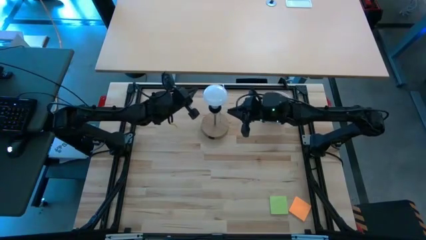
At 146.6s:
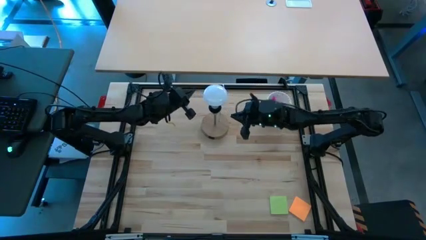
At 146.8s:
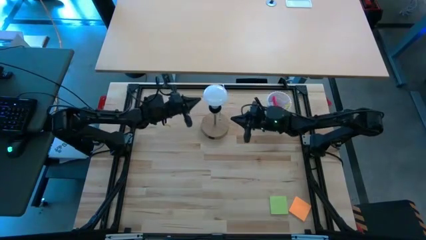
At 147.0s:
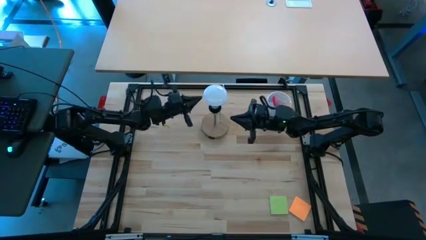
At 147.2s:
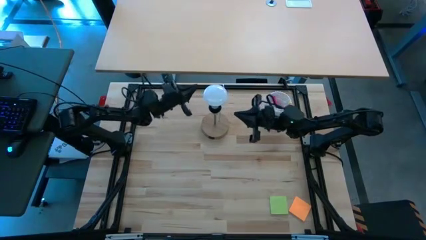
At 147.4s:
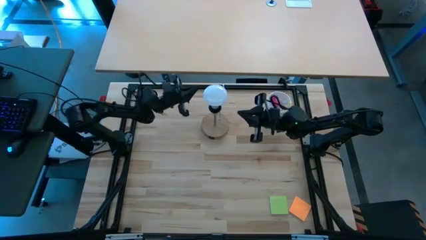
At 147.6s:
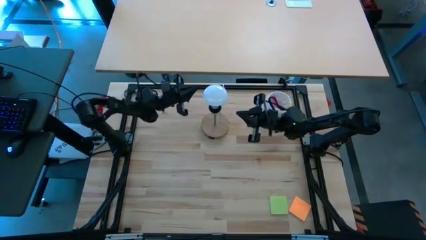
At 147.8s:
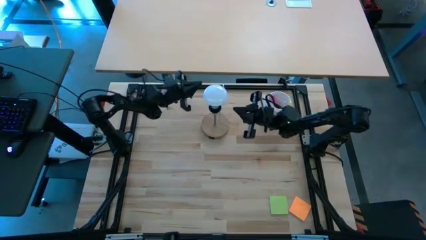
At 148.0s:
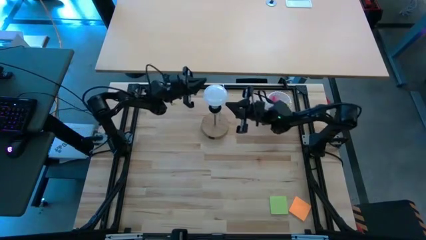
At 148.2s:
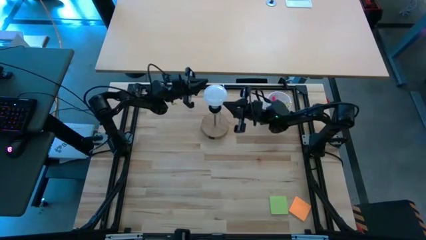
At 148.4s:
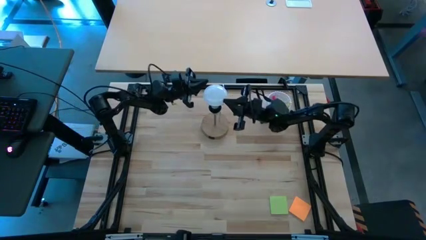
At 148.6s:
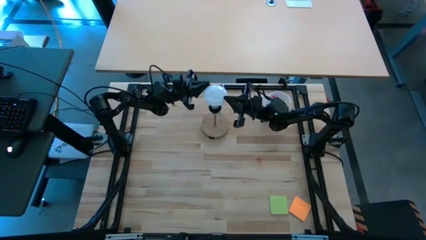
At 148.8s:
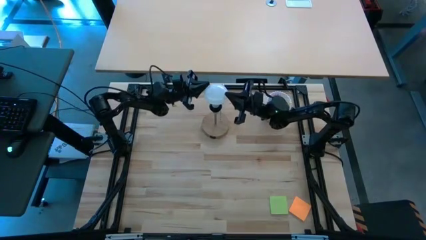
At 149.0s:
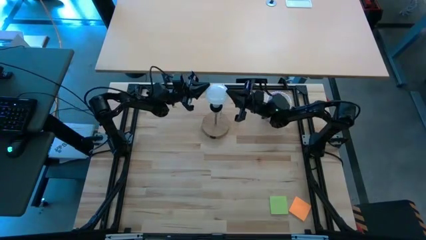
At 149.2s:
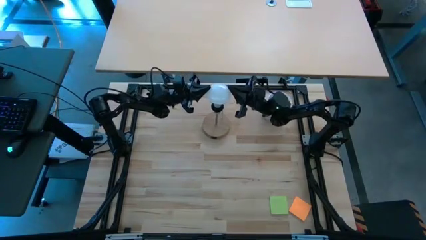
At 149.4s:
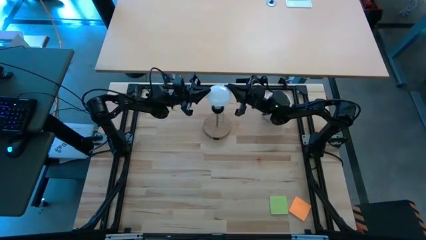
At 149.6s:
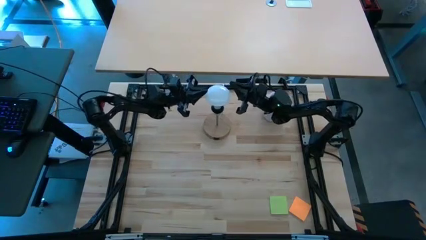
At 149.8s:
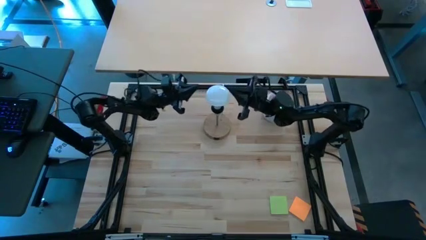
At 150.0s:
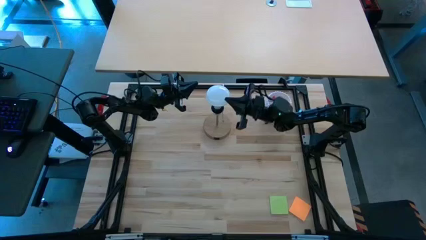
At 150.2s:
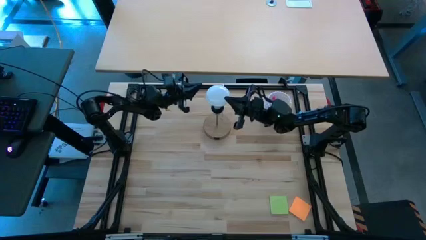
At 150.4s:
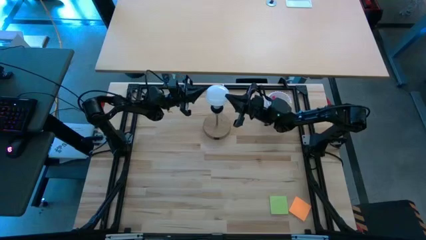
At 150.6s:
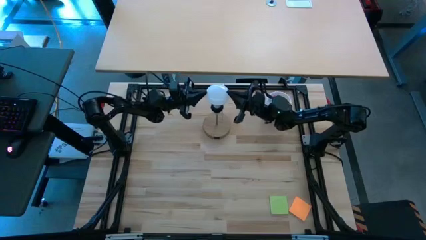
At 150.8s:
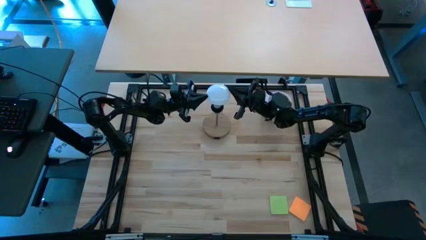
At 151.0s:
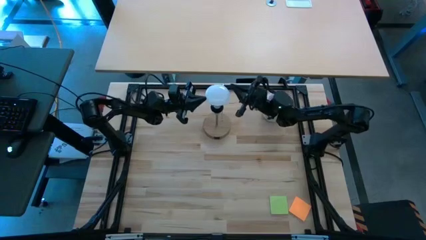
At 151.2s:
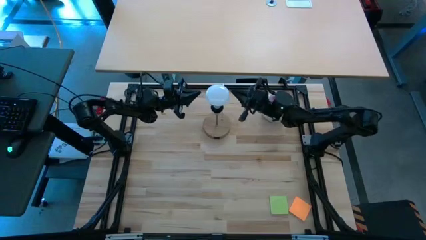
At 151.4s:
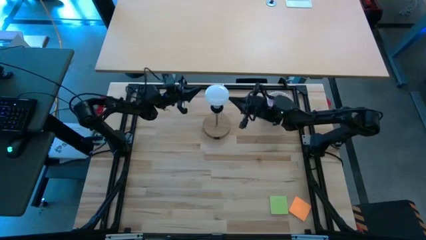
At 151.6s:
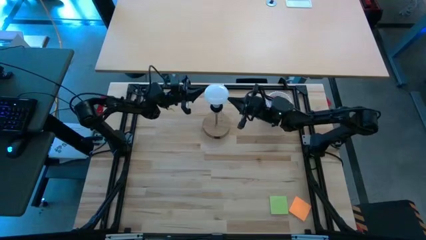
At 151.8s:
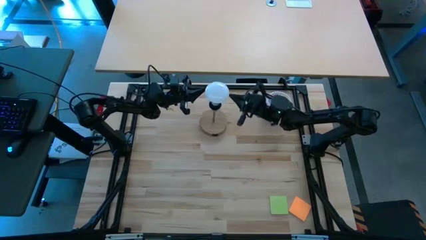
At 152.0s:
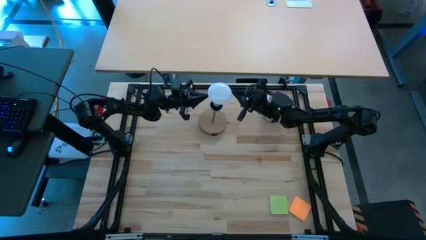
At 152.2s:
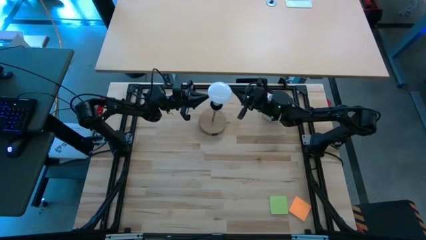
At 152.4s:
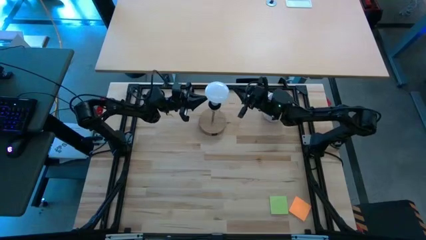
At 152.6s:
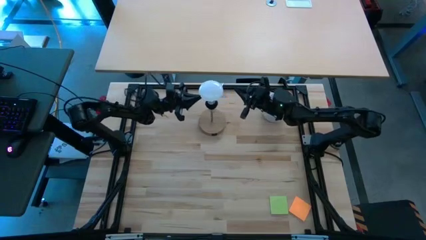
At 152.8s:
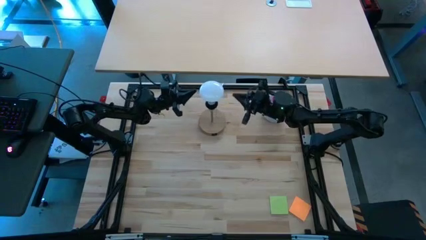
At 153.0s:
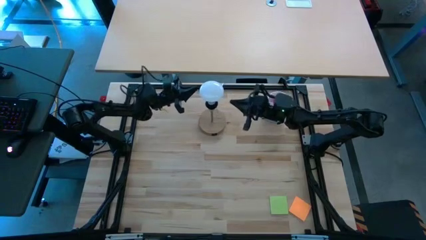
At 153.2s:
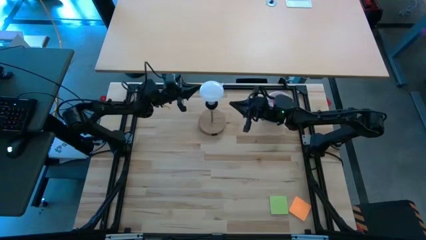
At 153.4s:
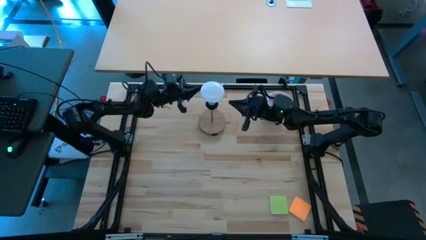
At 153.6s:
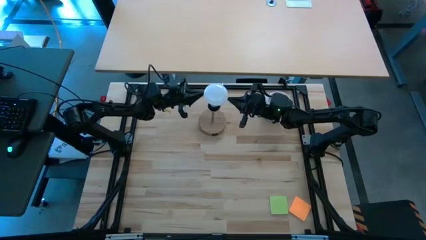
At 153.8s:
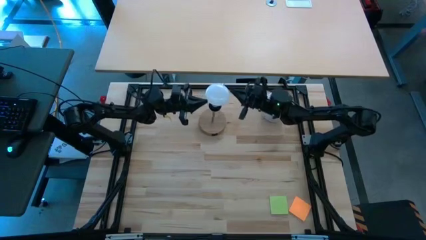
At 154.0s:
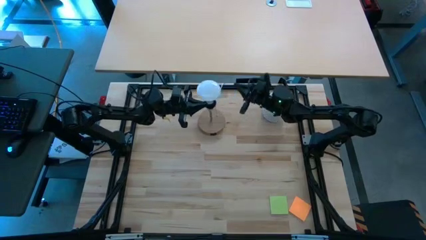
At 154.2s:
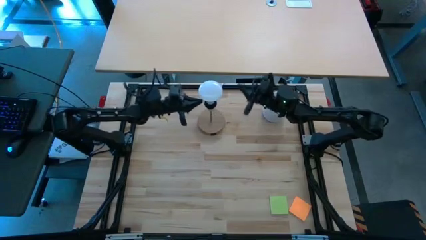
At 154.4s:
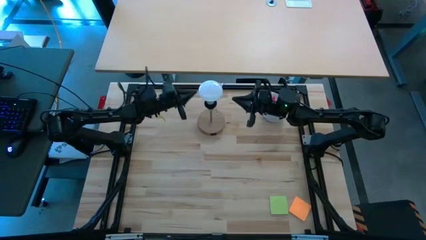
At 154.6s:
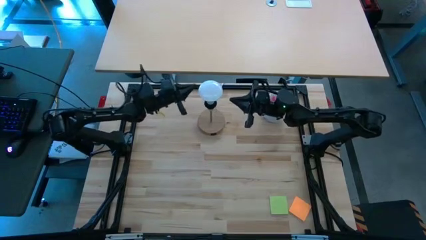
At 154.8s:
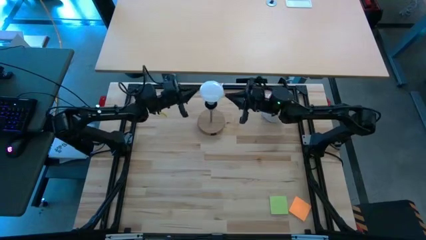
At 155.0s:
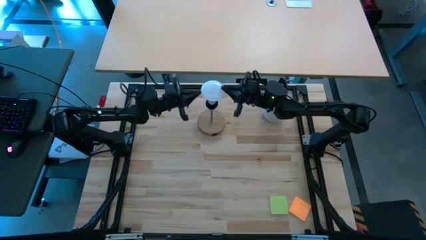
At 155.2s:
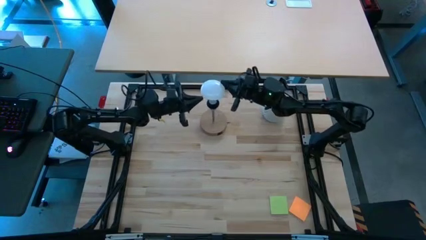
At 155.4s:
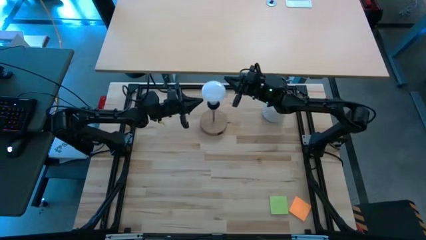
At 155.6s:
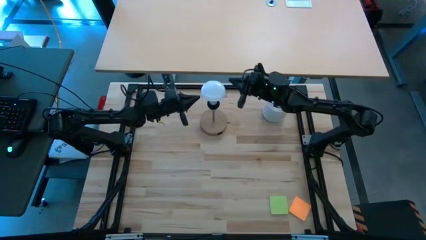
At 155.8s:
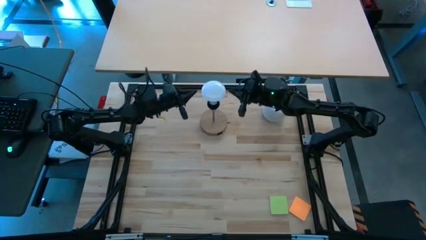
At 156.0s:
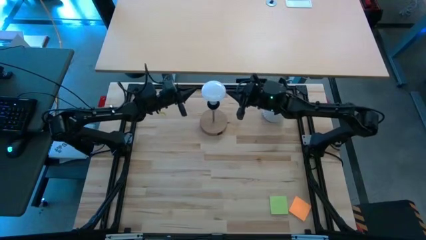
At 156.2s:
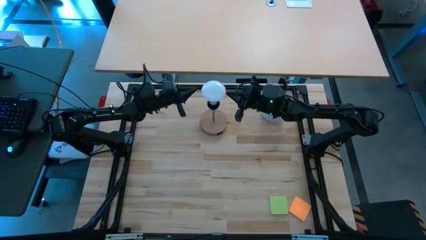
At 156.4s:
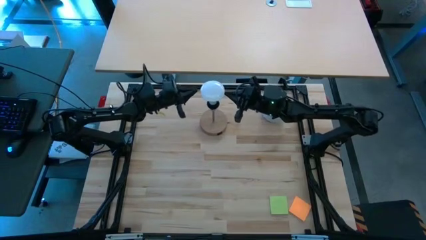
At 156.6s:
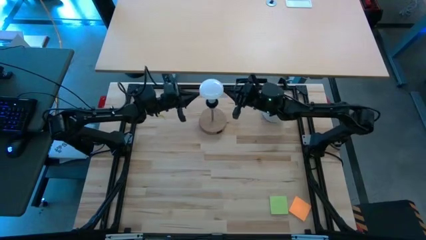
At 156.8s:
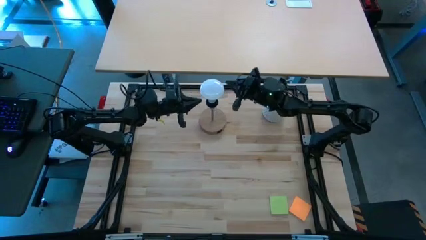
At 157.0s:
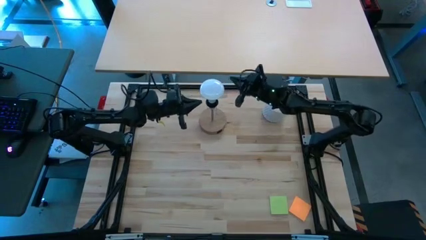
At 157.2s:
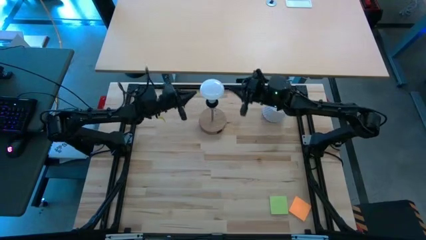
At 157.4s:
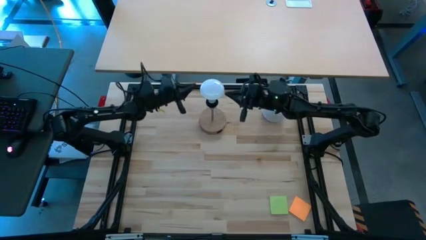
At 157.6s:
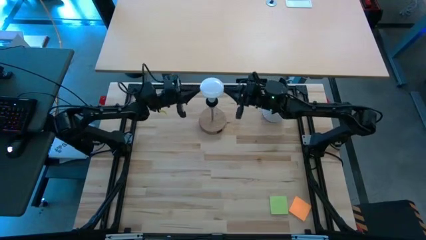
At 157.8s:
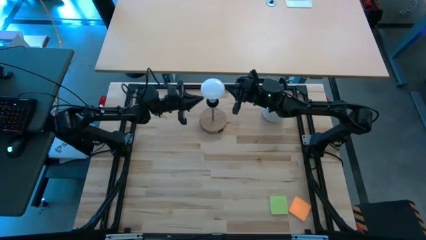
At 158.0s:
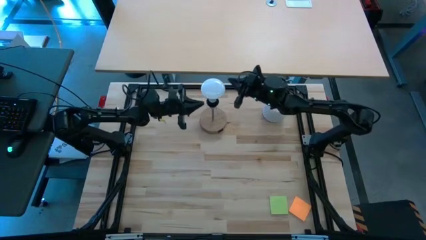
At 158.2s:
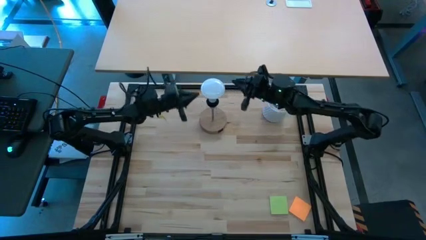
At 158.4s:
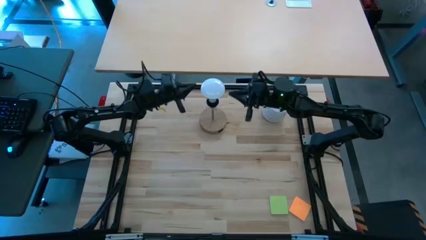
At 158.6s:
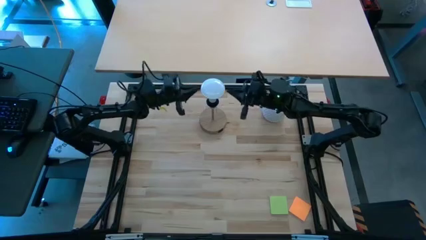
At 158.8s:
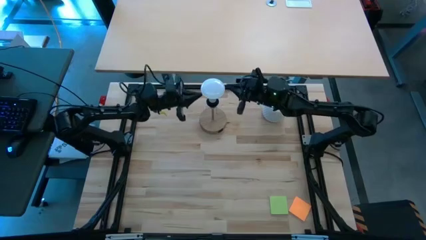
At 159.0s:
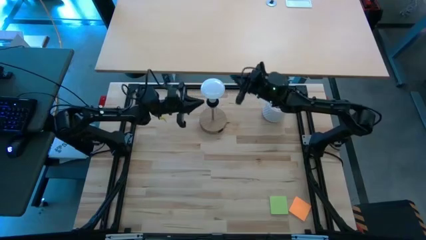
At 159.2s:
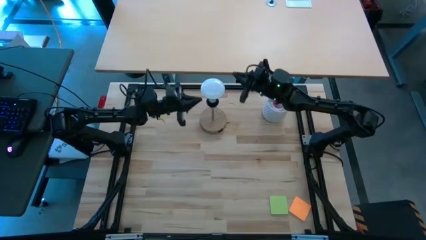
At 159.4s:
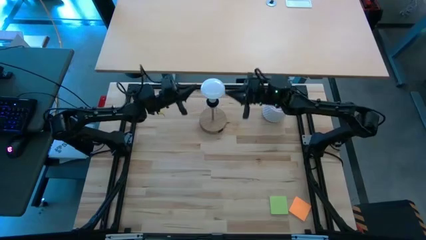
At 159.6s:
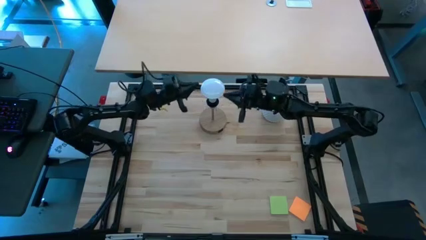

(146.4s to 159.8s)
Task: Screw lightbulb
Remove the white lightbulb from the desk lamp

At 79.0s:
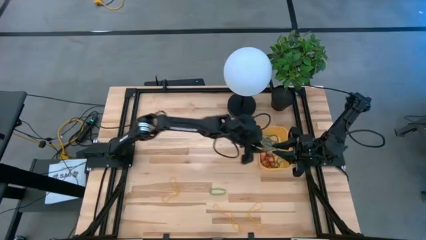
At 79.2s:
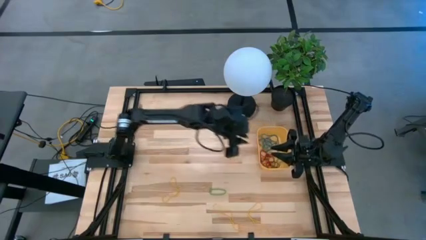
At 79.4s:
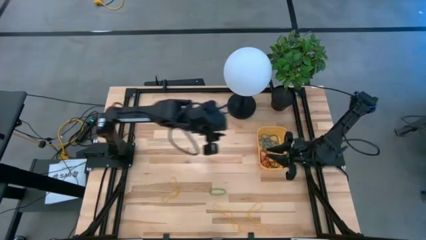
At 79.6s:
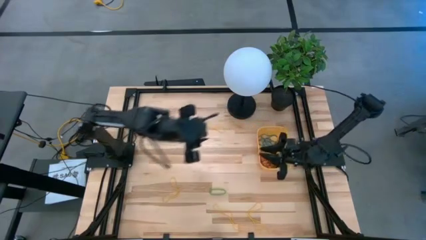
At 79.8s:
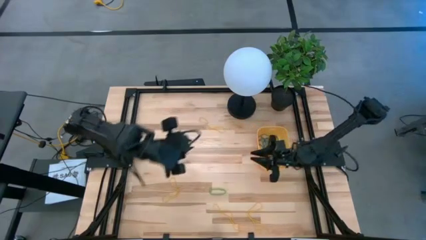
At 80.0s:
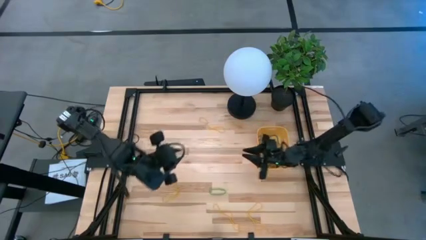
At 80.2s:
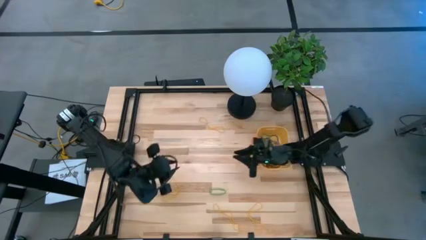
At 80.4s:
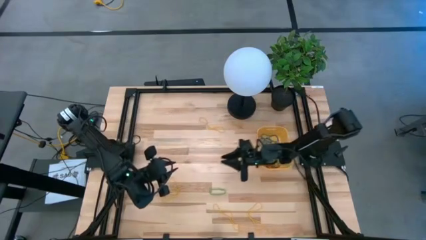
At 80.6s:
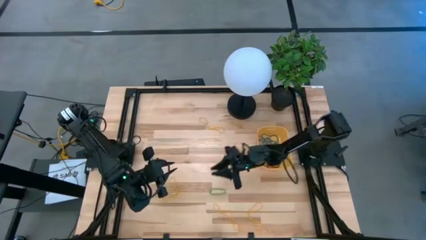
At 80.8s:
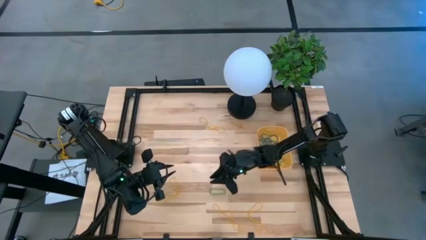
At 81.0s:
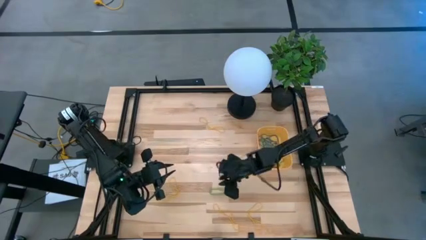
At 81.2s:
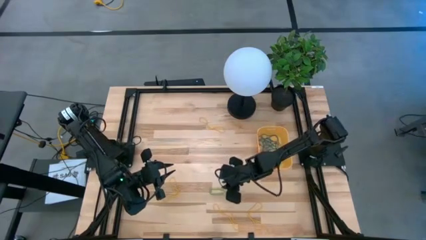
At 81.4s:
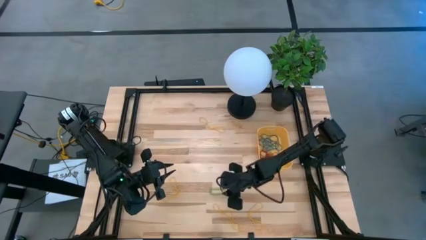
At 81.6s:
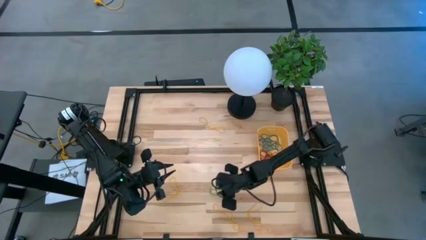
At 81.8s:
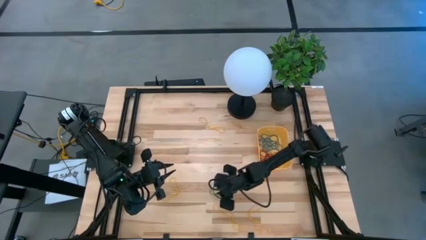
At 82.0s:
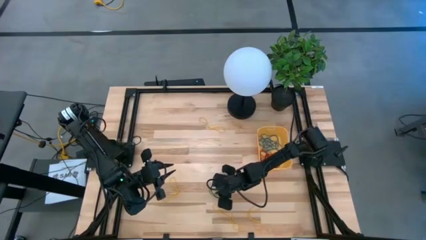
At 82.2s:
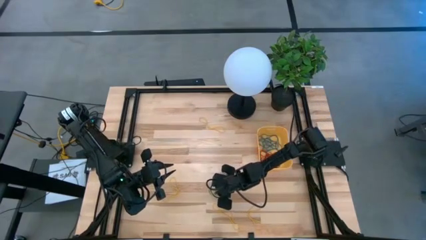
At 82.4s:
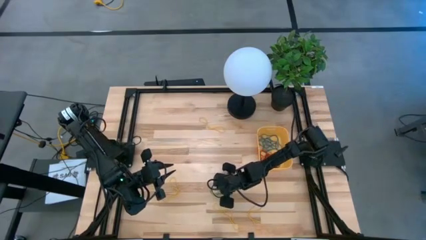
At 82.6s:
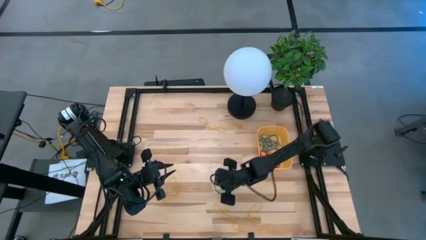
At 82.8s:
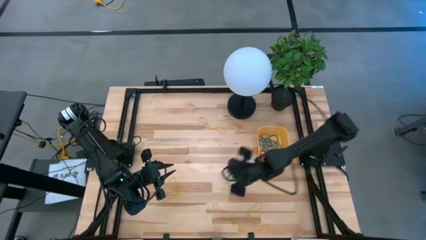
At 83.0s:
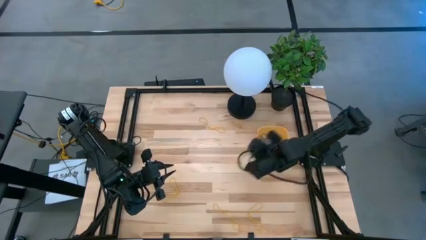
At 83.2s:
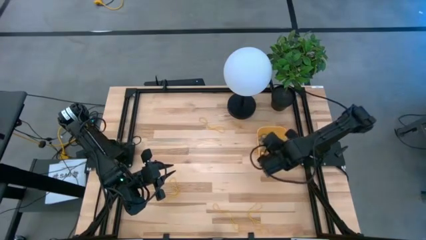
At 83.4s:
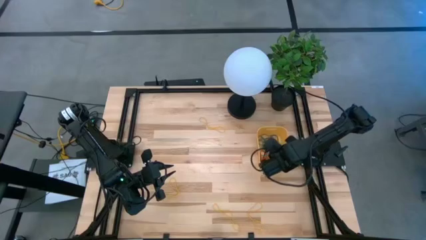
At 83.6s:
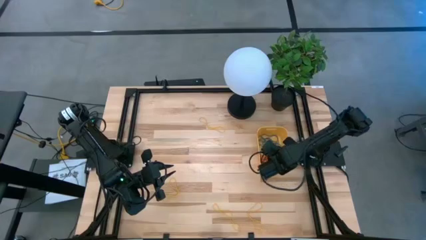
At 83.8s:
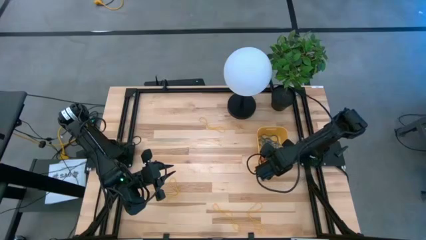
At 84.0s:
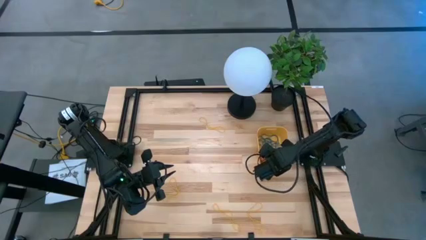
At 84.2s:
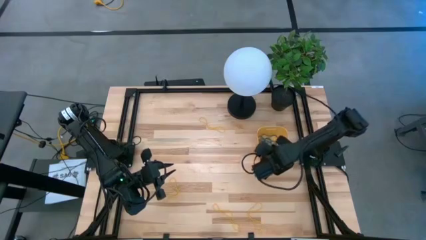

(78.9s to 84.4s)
Task: Pick and place items into bin
Put the green rubber band into the bin
